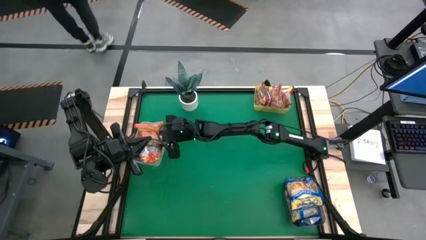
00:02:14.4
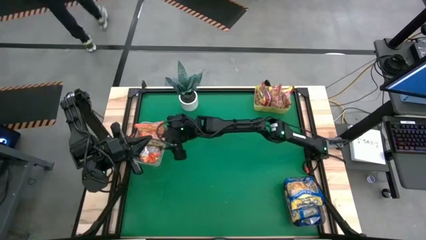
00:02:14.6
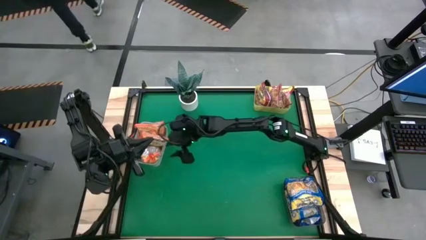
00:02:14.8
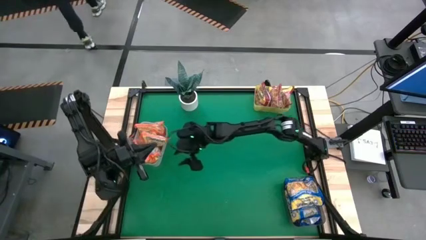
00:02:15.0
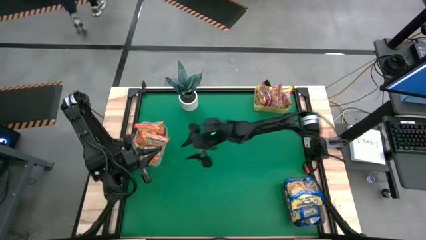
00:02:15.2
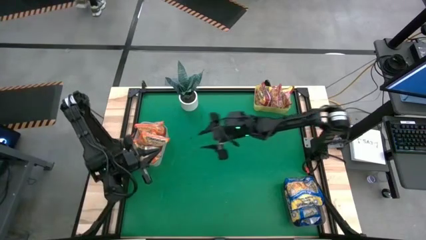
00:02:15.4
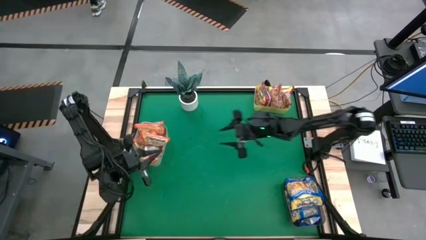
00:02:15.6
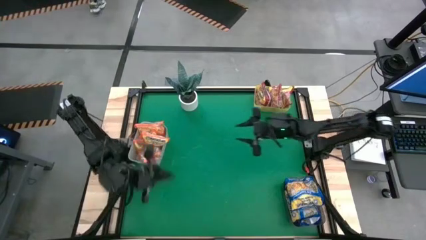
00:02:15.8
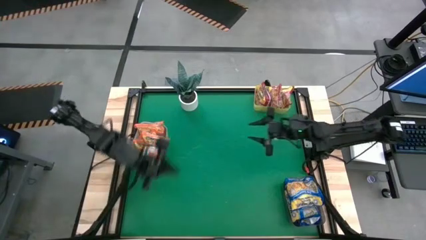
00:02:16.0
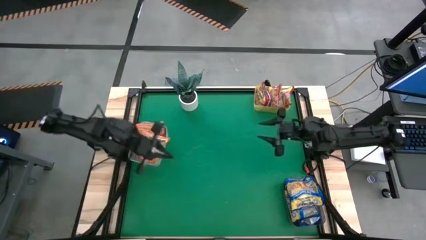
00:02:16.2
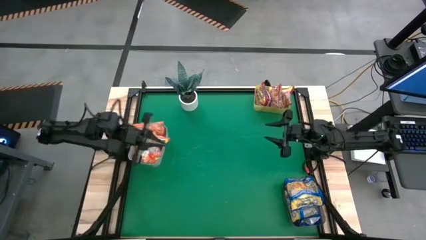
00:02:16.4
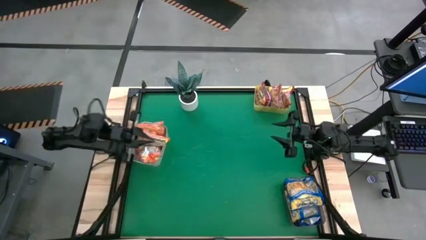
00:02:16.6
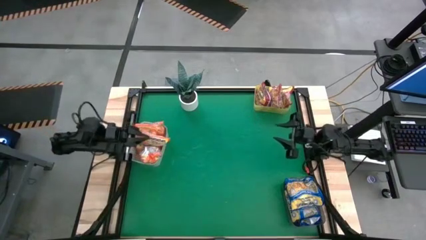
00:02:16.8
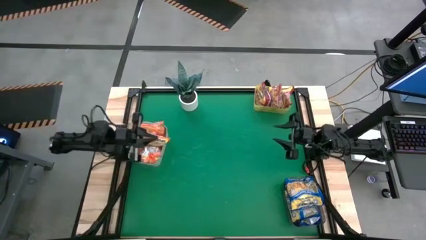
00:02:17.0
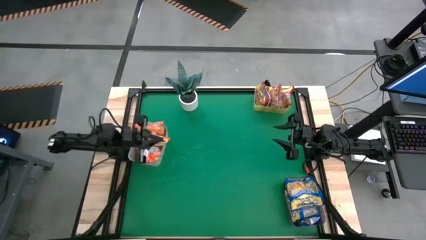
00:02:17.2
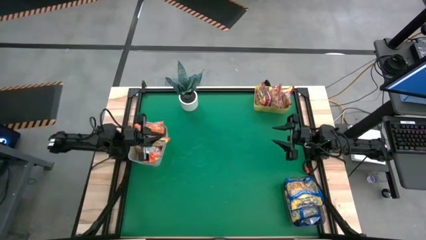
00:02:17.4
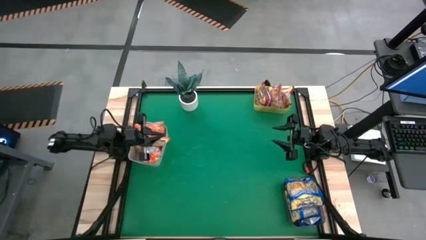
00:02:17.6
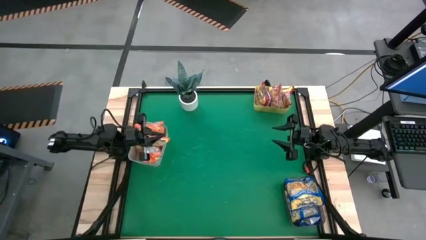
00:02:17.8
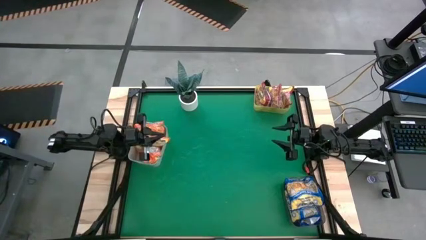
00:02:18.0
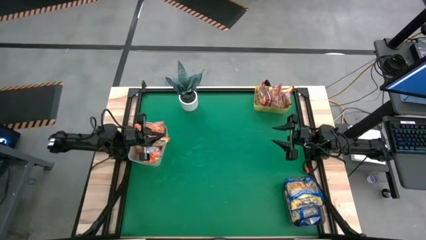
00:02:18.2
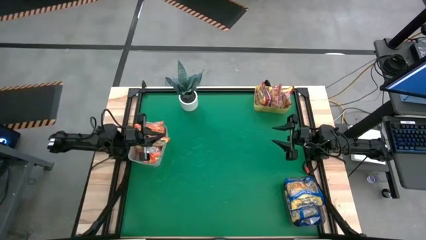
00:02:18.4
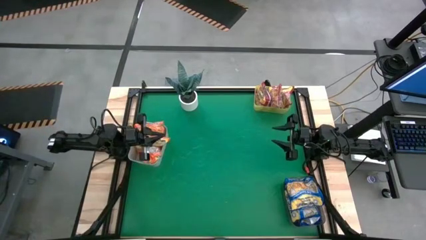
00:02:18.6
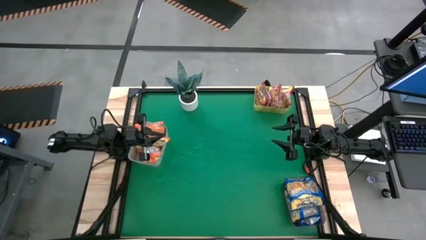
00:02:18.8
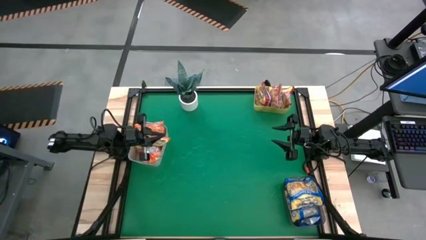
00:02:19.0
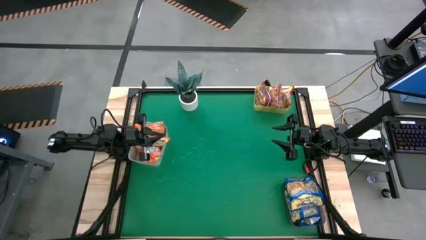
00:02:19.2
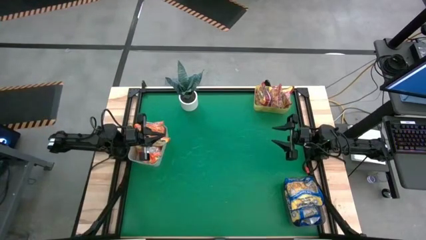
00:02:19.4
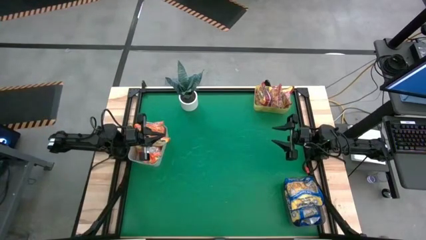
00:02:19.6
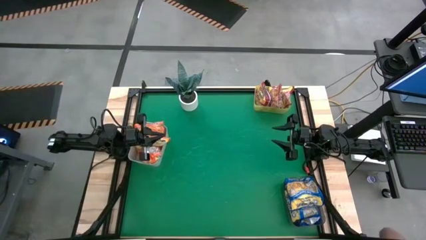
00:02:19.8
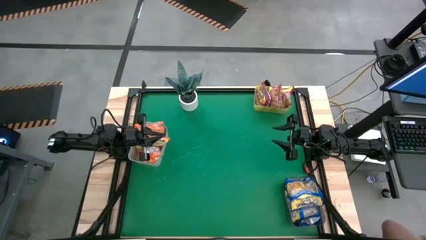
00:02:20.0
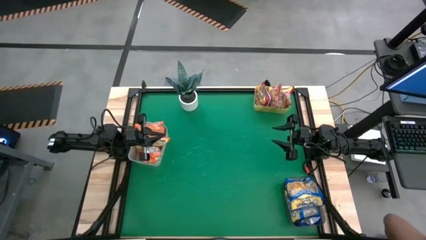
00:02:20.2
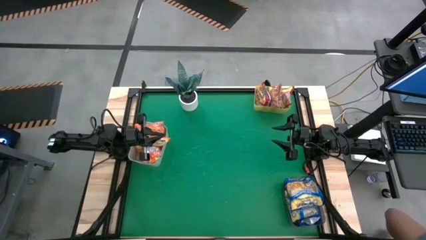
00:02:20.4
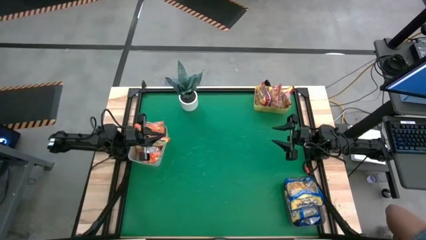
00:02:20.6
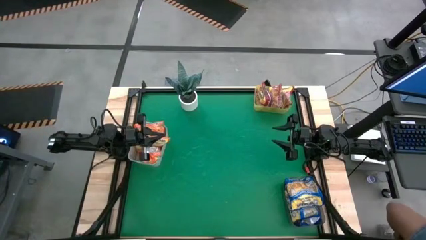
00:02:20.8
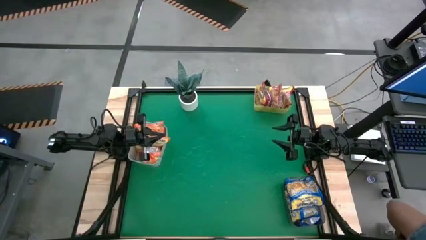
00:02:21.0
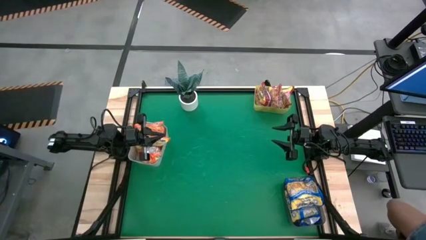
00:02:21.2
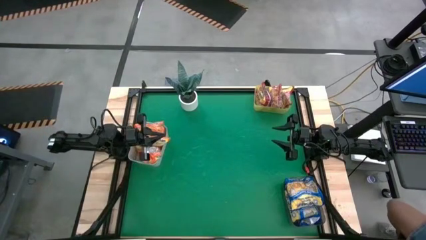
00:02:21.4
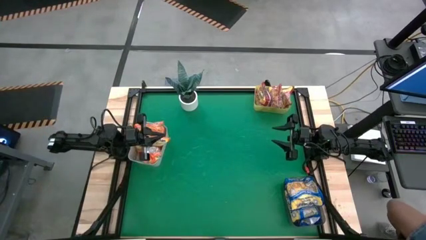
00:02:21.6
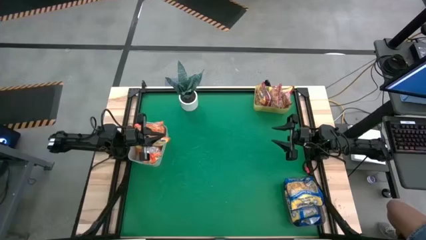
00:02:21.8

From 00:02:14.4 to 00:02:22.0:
Task: Sort Maruchan noodles
Return to Home Position

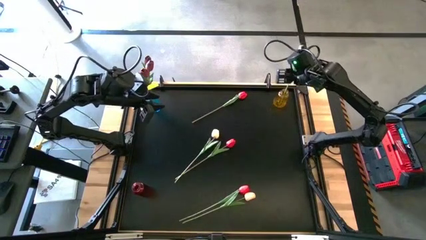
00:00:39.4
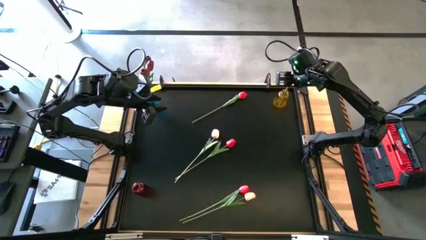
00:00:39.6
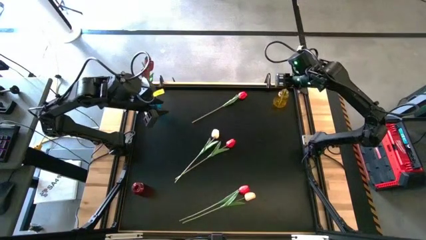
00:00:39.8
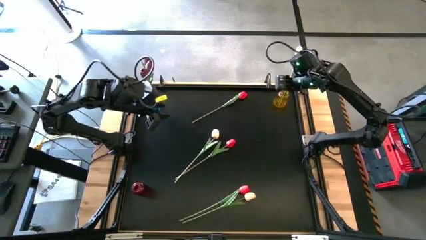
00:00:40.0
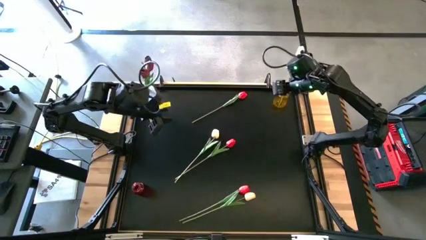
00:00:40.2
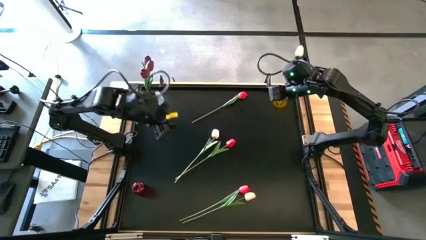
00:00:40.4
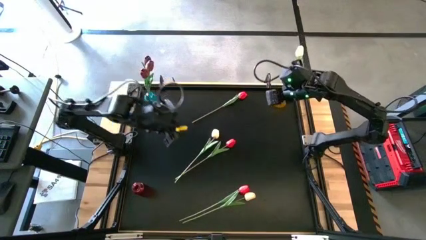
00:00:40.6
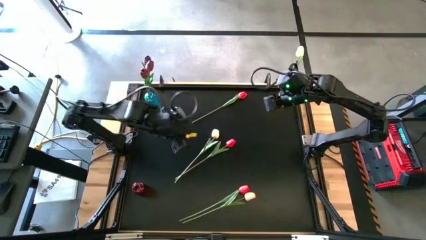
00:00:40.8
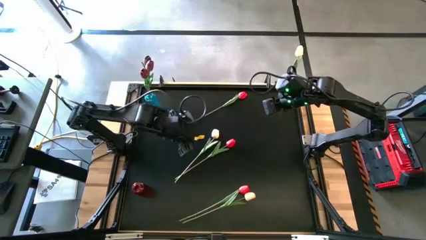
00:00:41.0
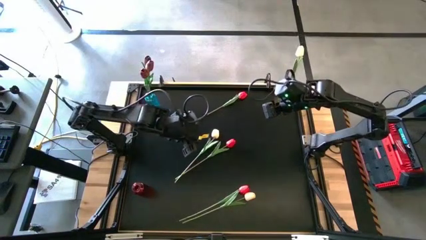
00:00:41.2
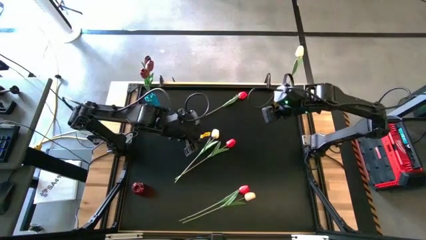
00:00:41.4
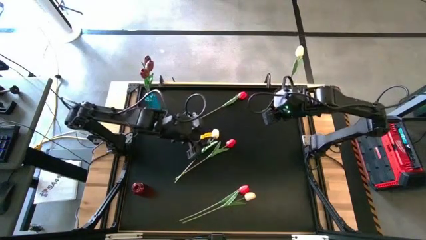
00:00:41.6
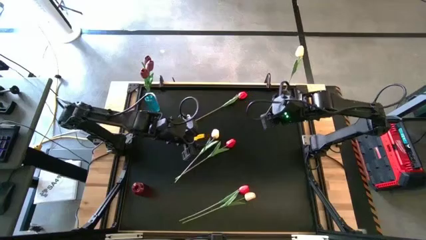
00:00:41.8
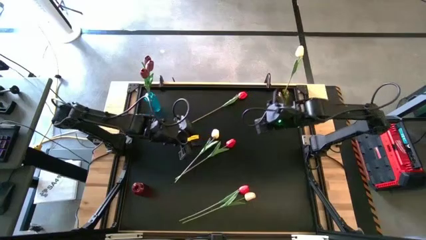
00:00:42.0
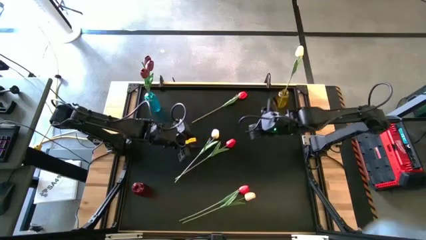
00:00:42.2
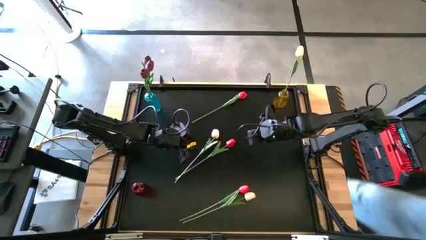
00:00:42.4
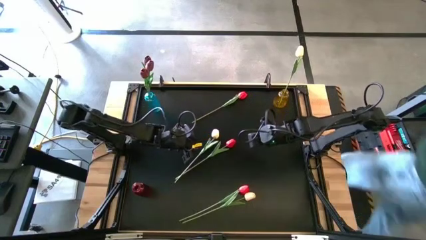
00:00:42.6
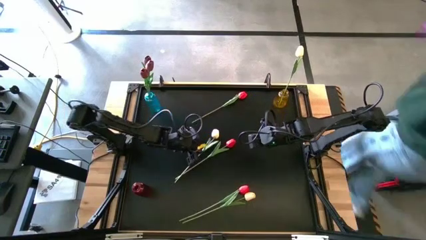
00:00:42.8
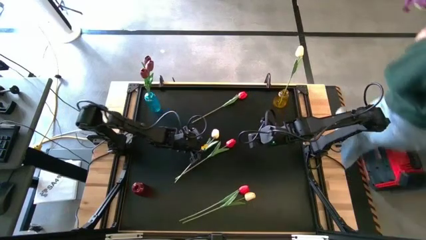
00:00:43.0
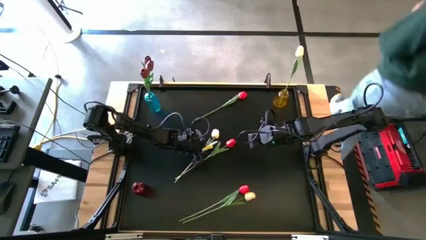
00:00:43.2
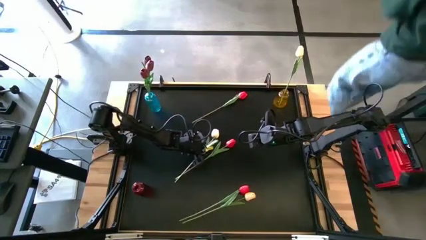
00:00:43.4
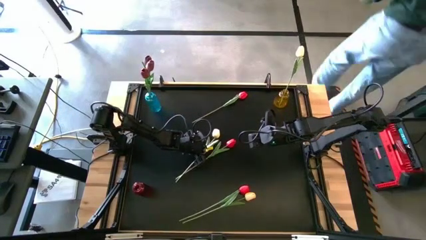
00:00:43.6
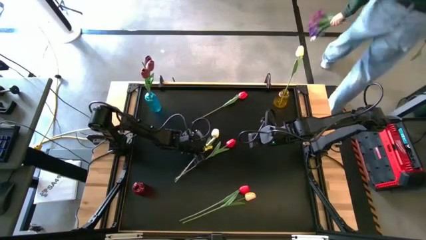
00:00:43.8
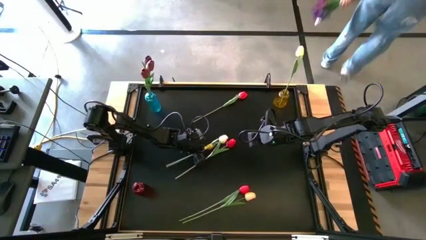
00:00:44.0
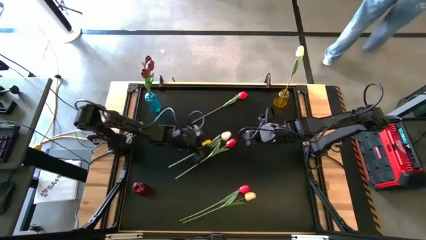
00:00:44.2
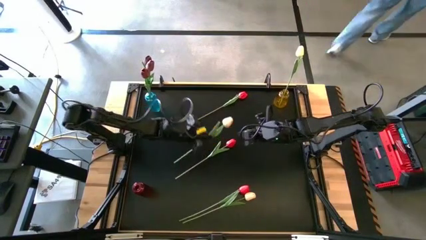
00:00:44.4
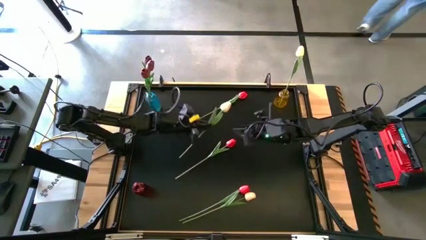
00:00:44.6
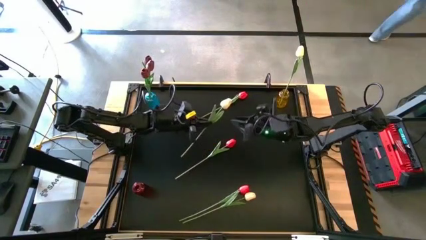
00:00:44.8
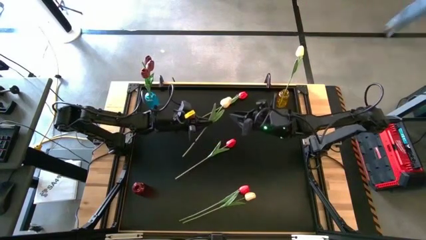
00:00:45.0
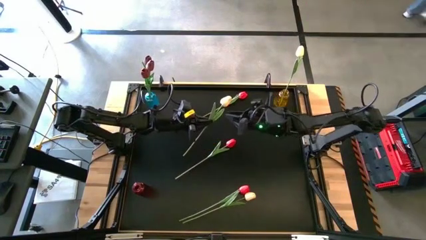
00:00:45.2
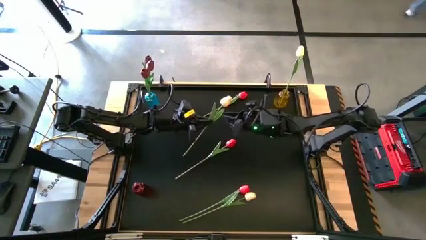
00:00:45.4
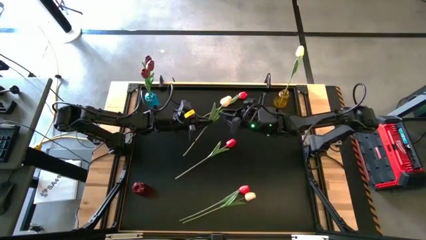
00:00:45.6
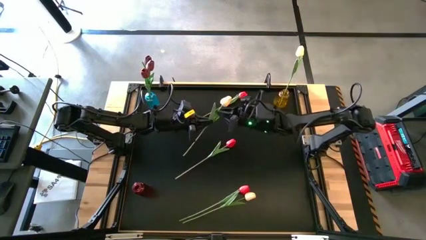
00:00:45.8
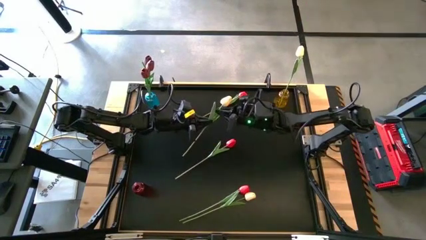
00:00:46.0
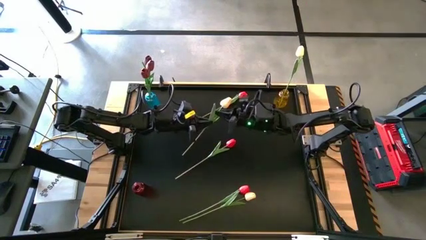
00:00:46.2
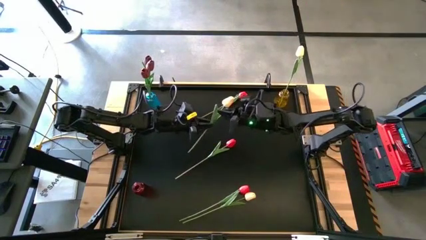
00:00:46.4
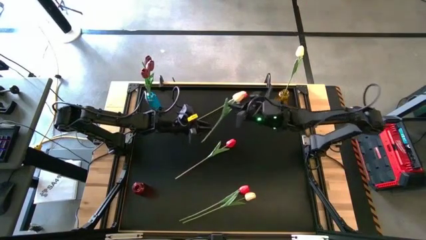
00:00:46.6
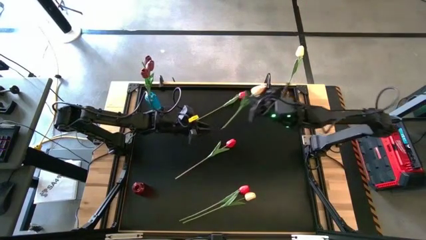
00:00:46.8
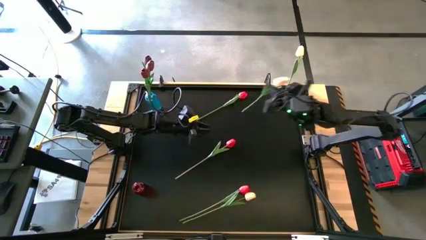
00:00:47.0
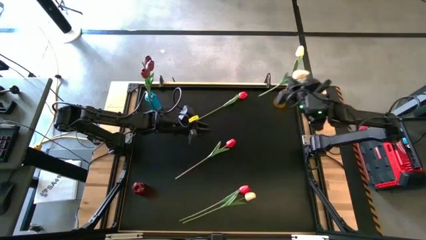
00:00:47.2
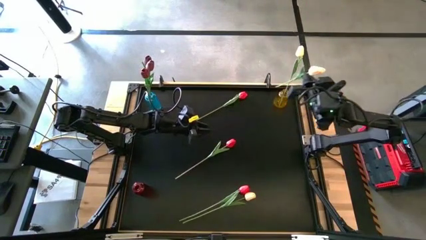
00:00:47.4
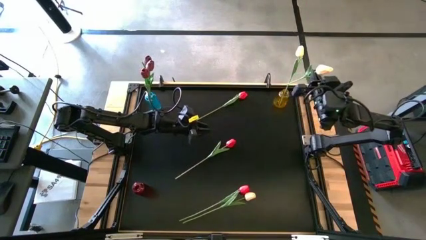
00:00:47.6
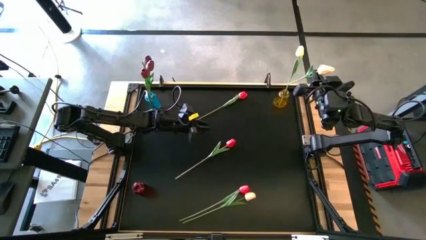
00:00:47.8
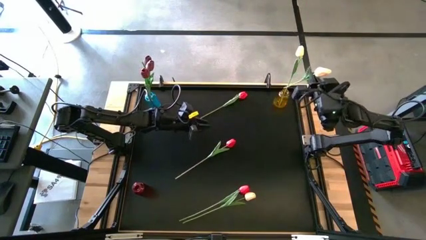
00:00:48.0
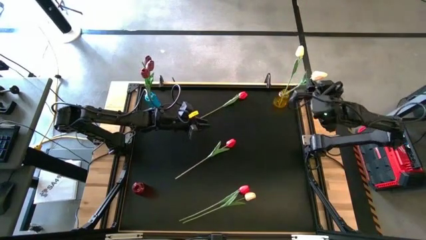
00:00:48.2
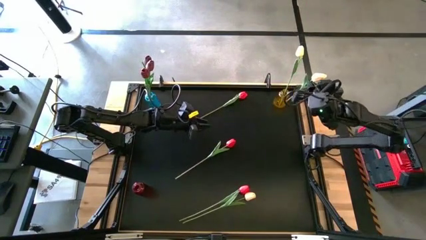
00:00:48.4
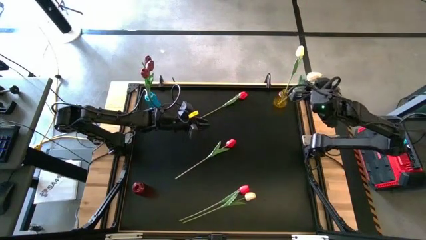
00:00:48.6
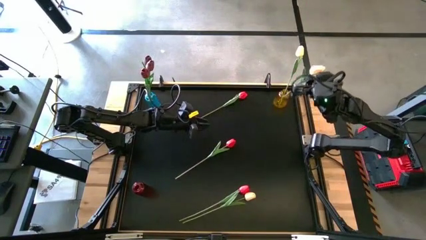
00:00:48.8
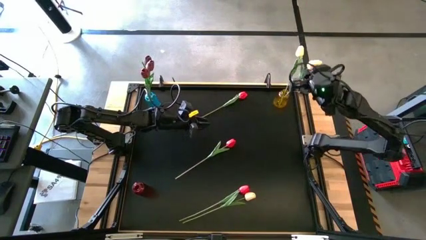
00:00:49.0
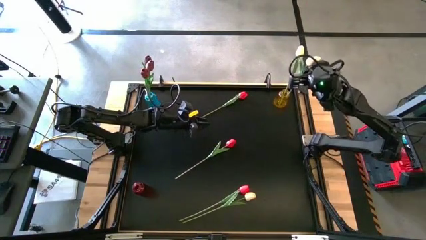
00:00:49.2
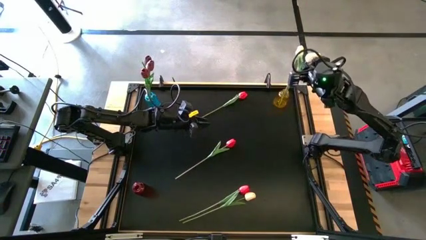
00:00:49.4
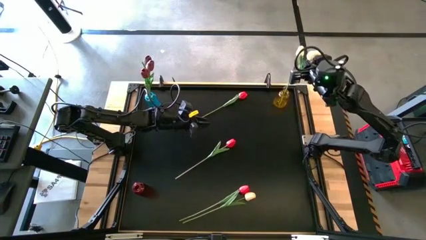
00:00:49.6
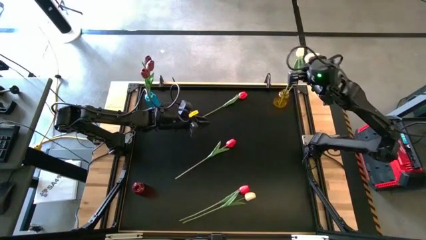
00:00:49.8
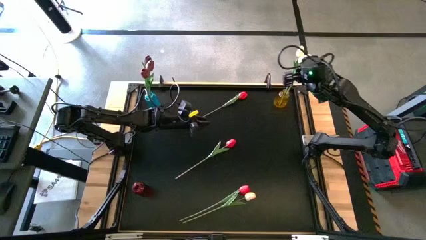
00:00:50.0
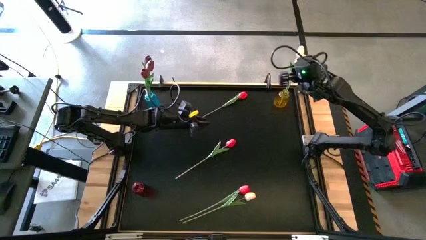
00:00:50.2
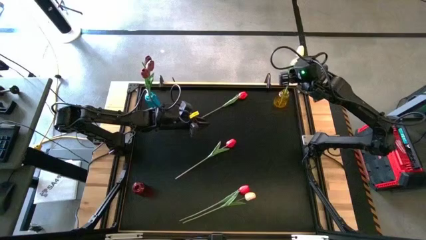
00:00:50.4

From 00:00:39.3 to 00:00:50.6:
Task: Sort flowers into vase by color
Put the center yellow flower into the yellow vase
